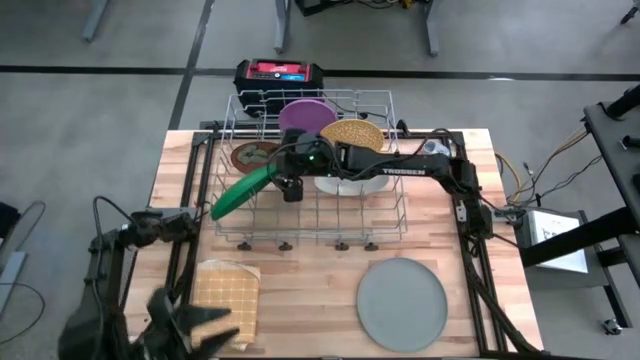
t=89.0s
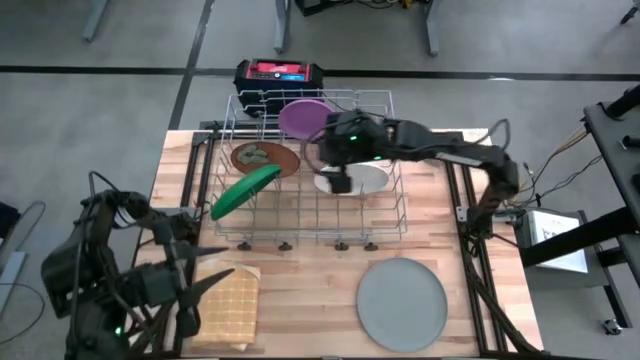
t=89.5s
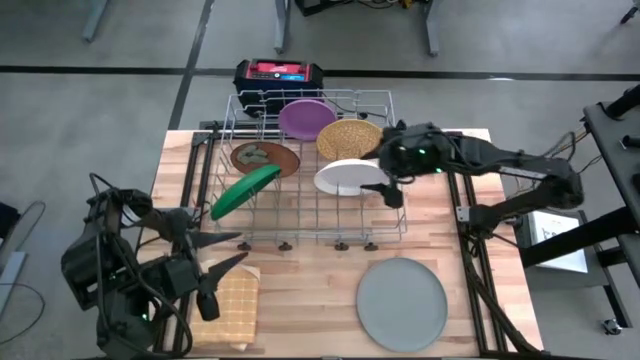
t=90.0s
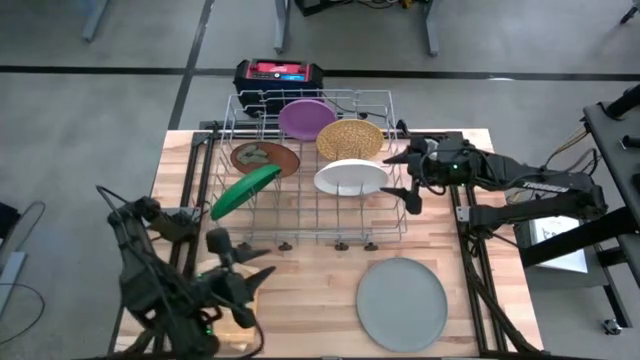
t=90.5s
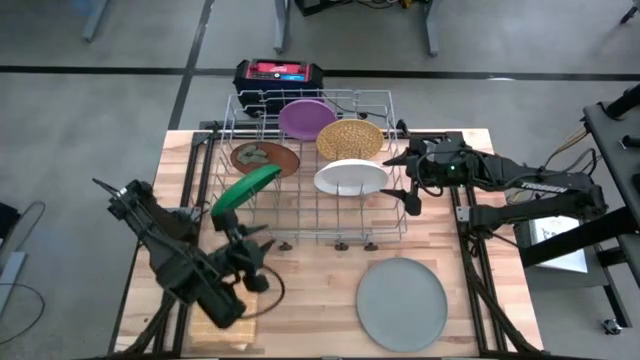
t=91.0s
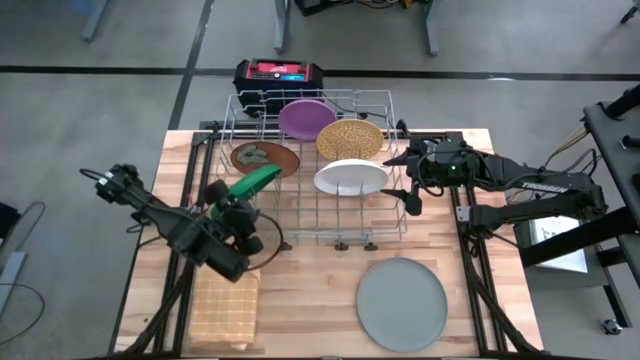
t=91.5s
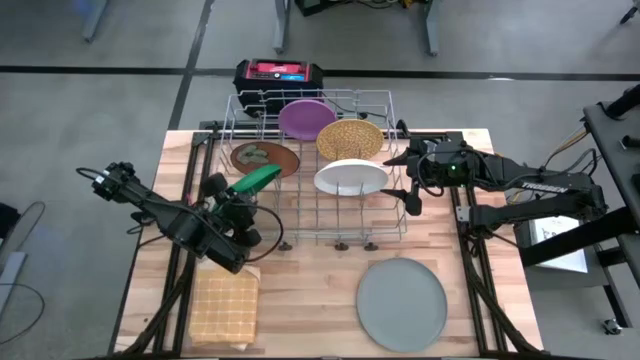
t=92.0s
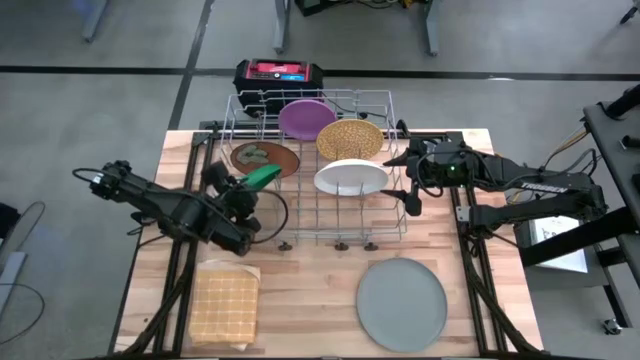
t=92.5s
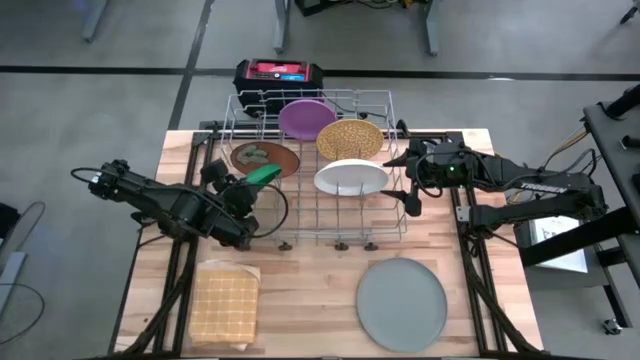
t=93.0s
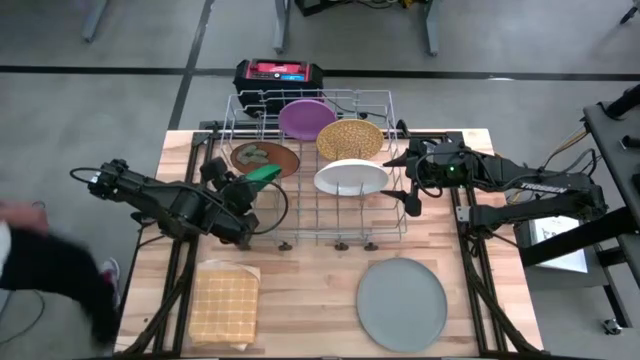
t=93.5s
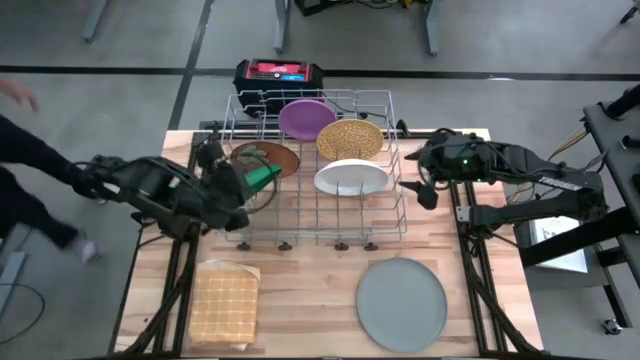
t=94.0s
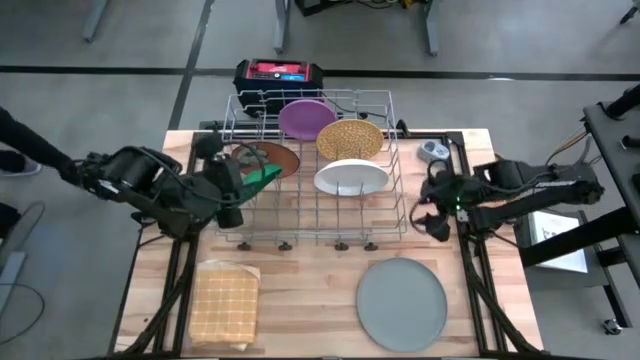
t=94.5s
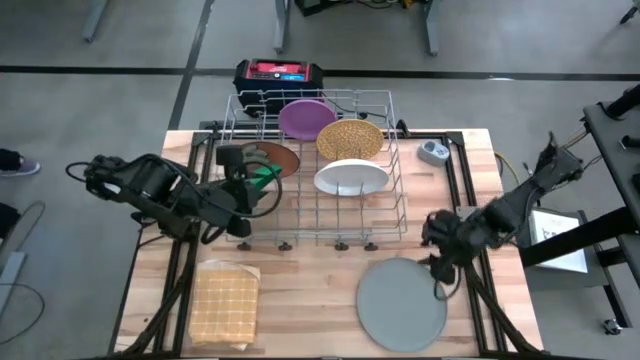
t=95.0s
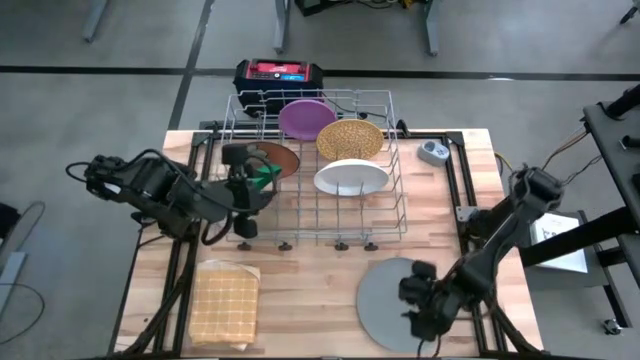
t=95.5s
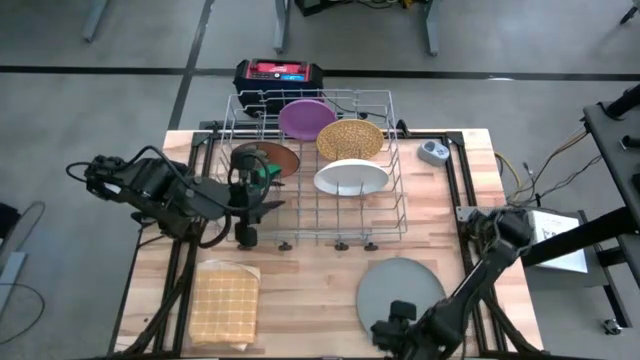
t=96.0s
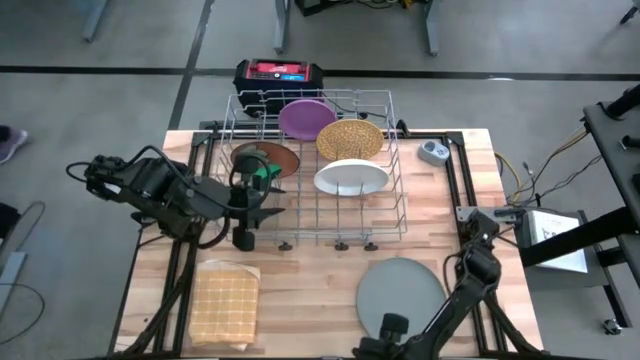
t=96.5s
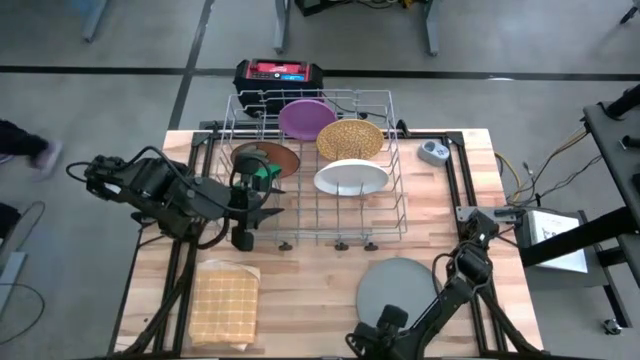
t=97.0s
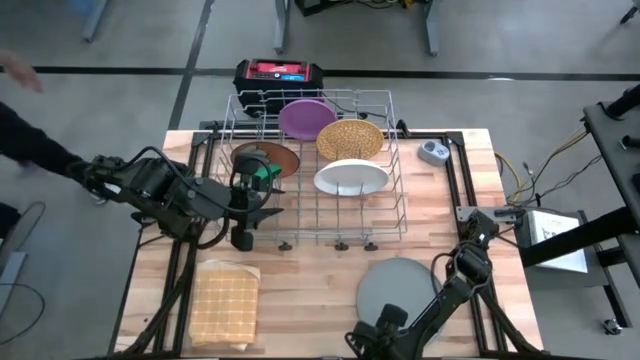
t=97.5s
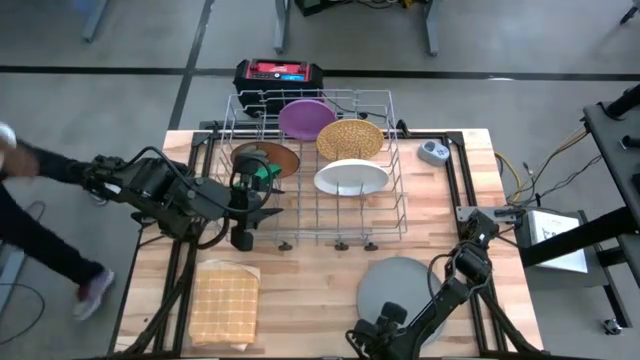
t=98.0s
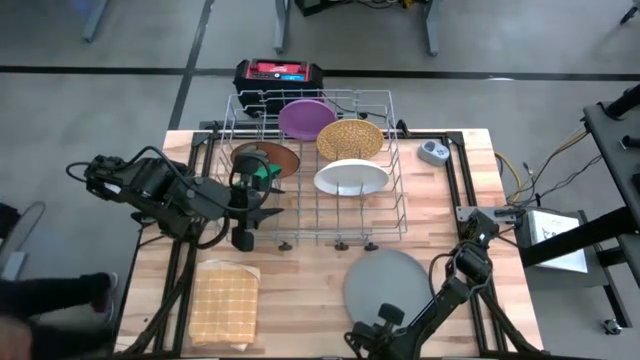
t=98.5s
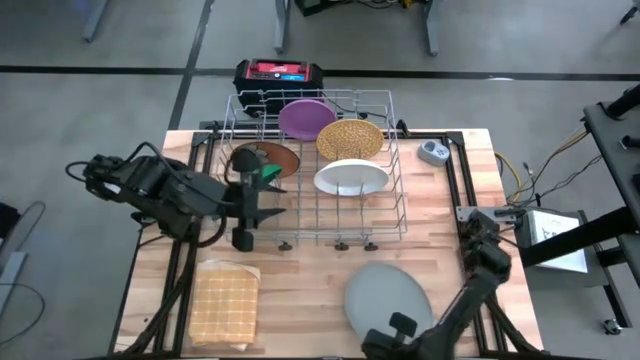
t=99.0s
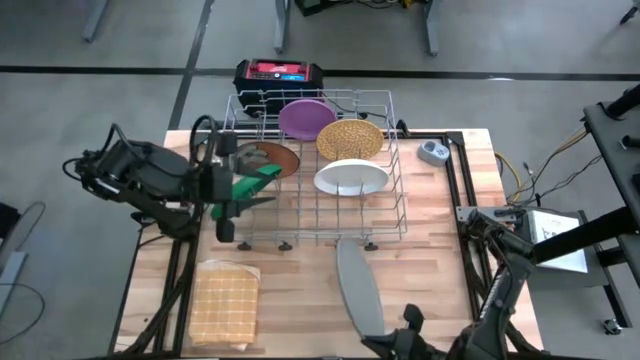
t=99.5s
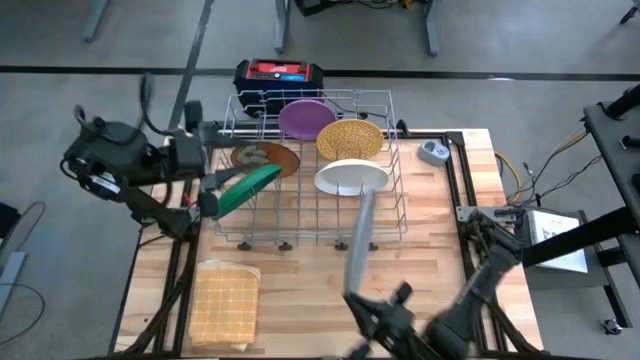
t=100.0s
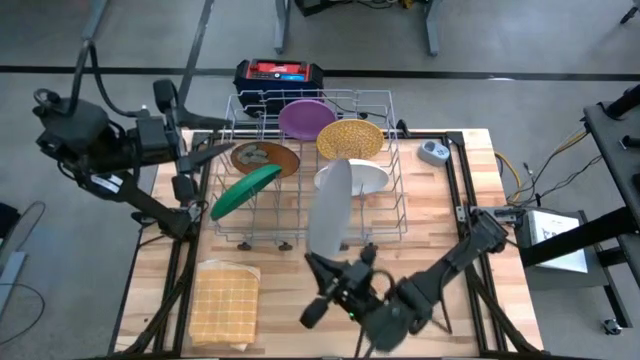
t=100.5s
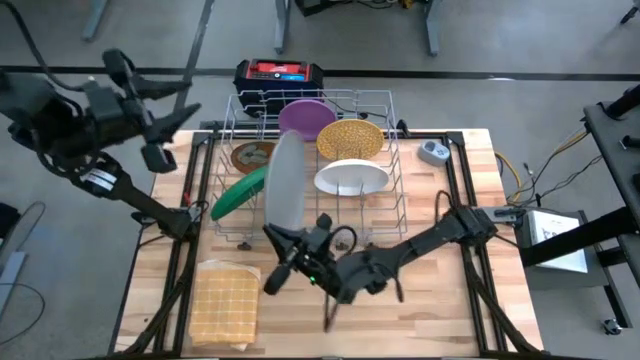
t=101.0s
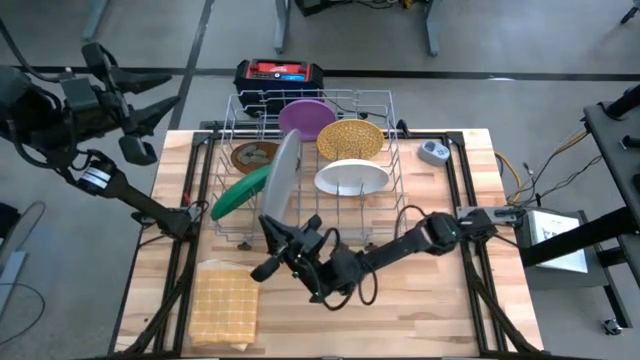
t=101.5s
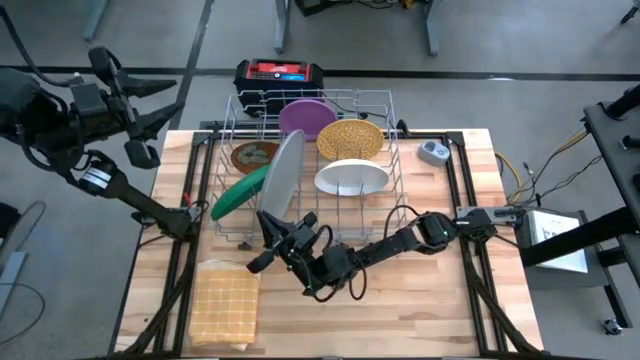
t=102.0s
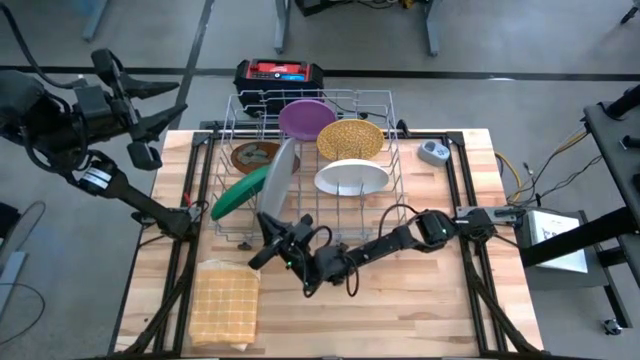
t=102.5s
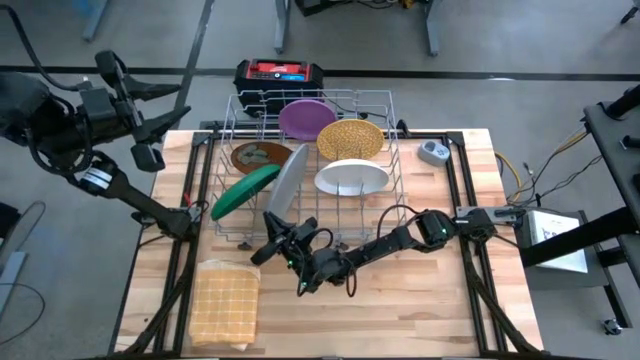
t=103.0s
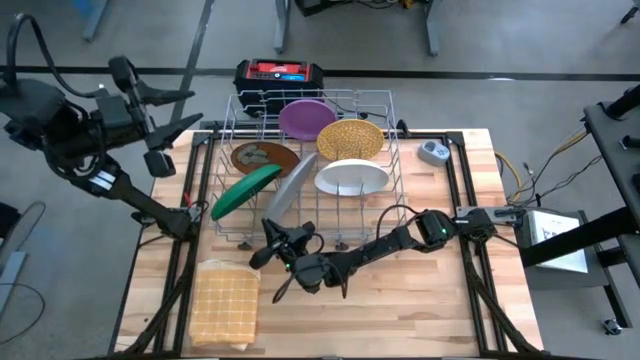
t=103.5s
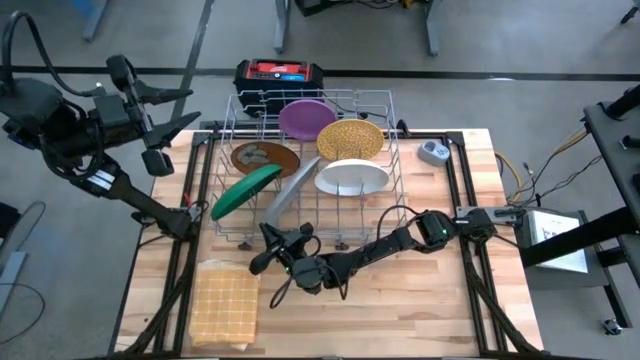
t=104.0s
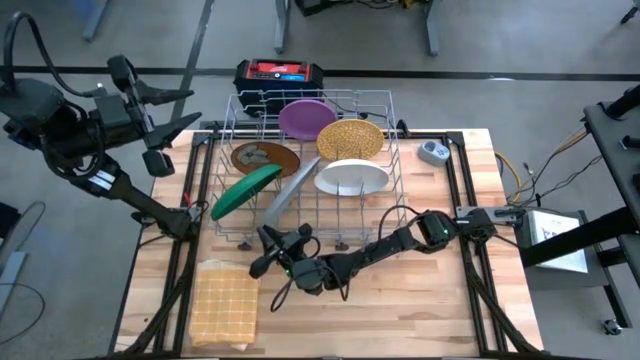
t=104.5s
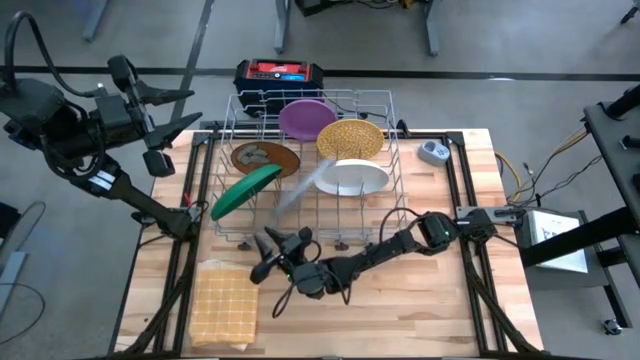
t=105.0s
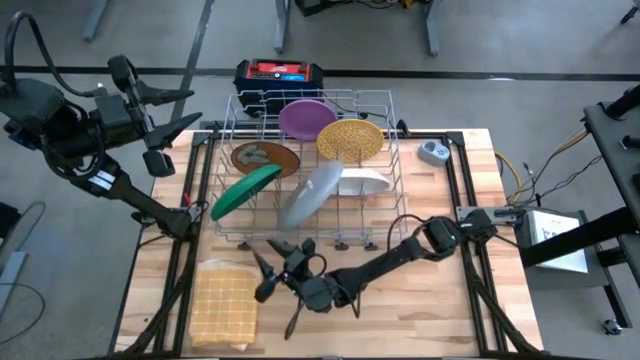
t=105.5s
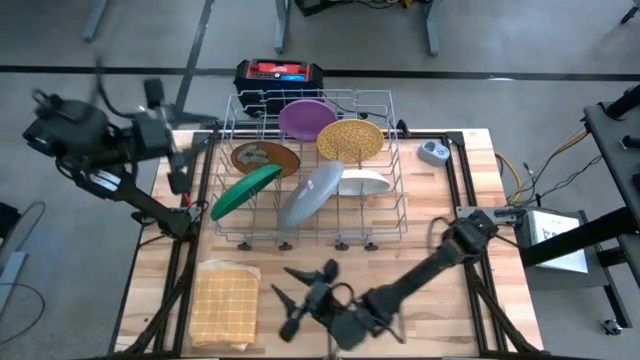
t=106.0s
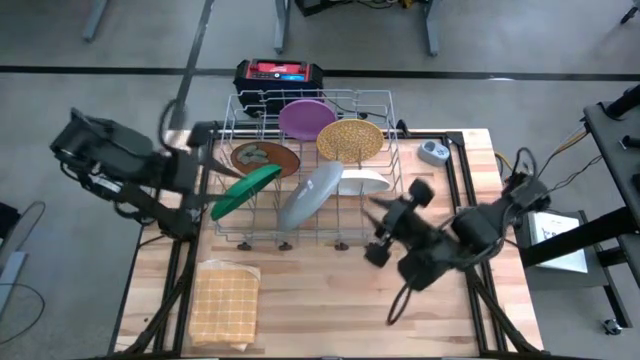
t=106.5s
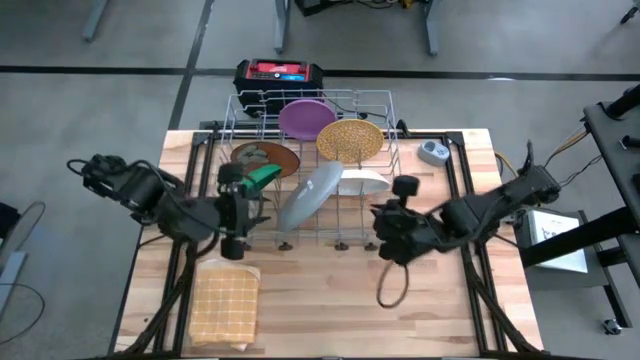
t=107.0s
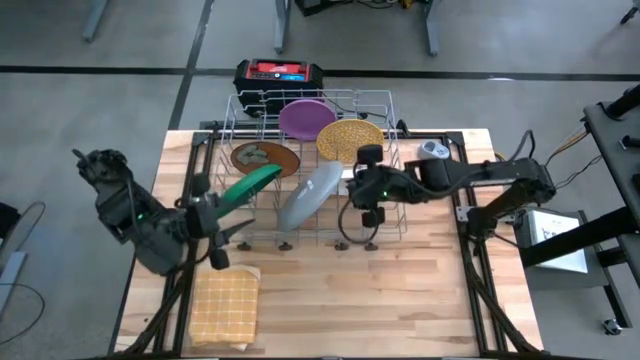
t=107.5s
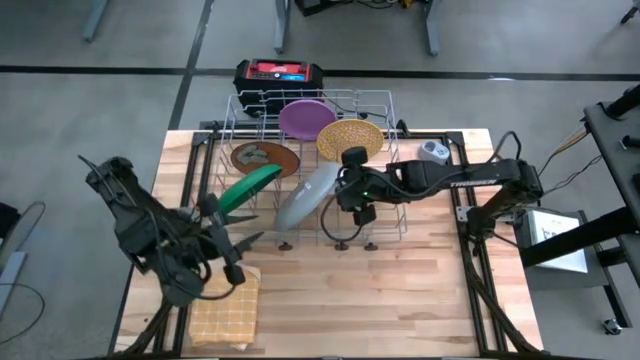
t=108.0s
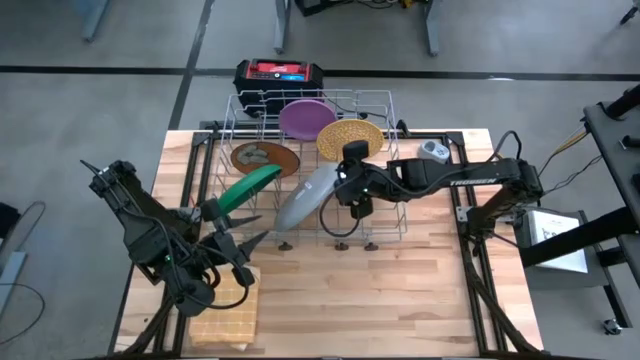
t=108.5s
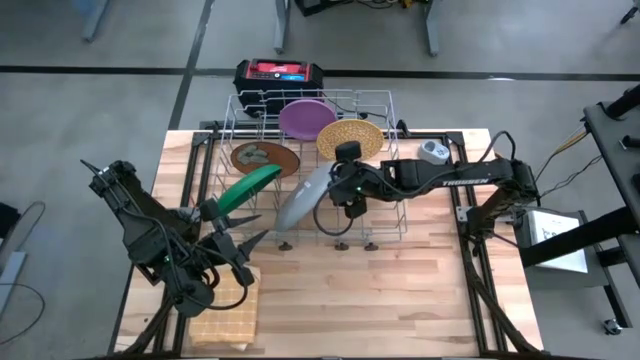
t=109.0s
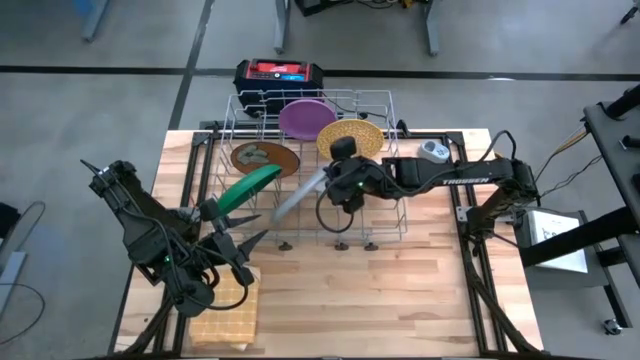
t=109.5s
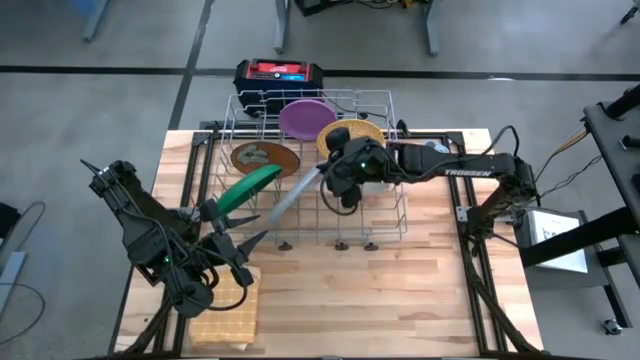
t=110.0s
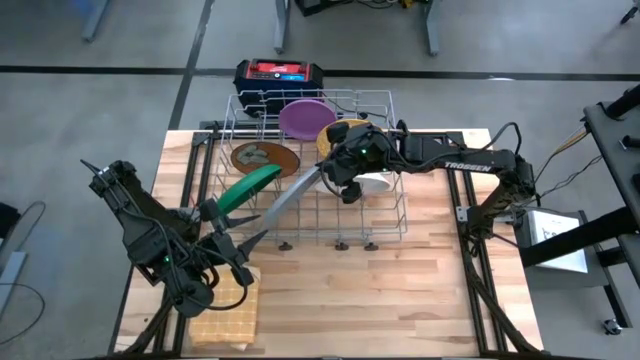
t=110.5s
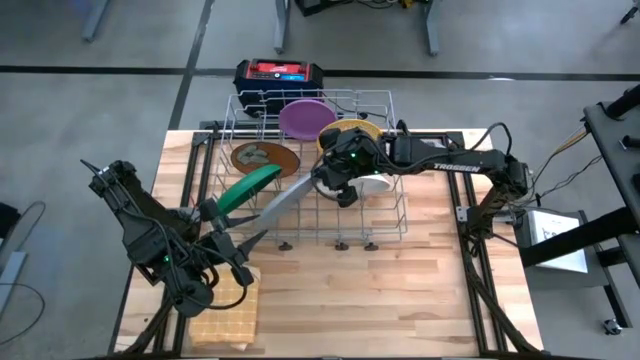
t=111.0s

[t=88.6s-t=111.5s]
Task: Sort dishes
Put the grey plate into the dish rack
